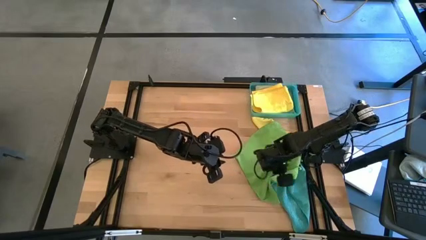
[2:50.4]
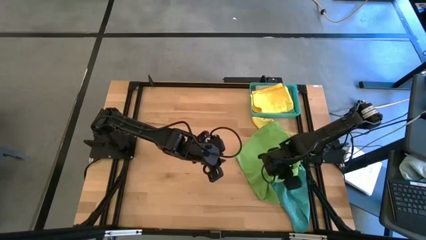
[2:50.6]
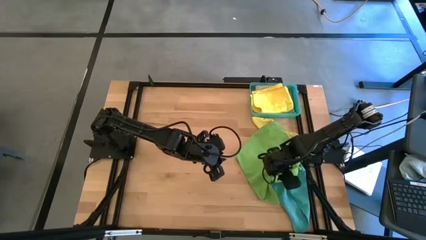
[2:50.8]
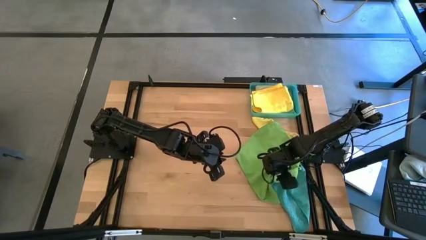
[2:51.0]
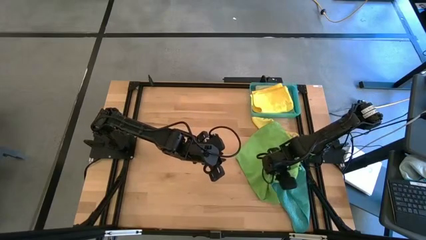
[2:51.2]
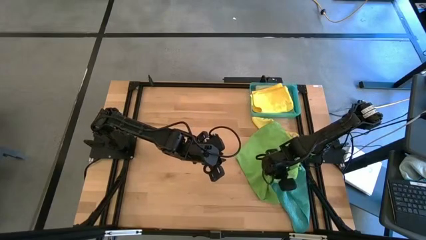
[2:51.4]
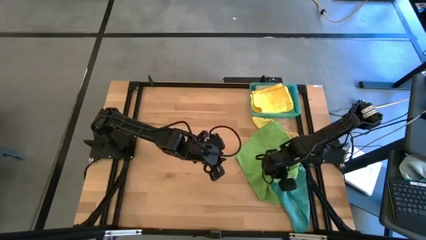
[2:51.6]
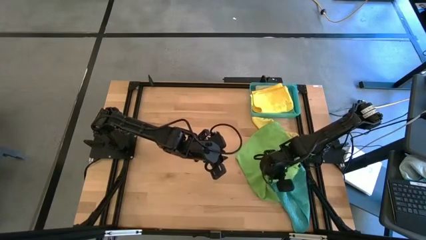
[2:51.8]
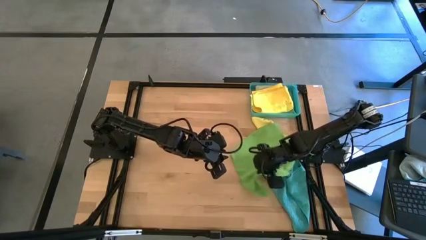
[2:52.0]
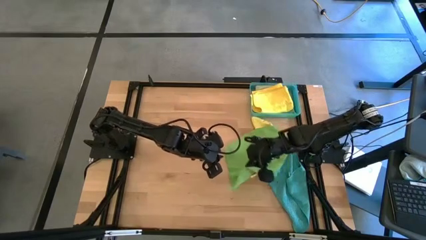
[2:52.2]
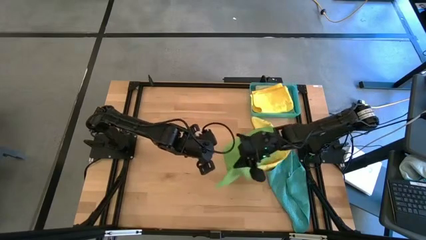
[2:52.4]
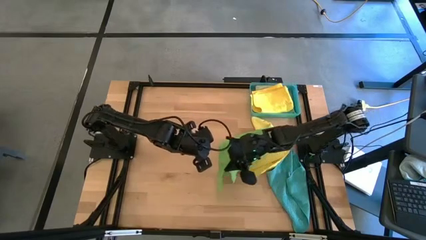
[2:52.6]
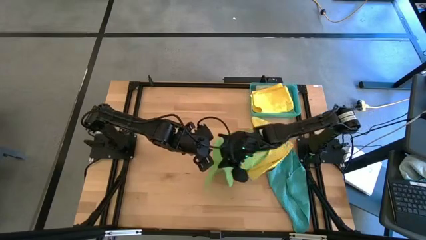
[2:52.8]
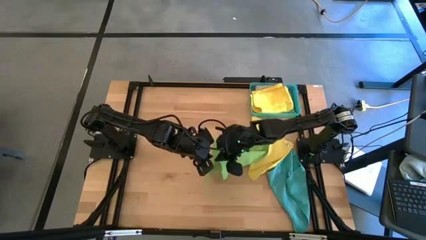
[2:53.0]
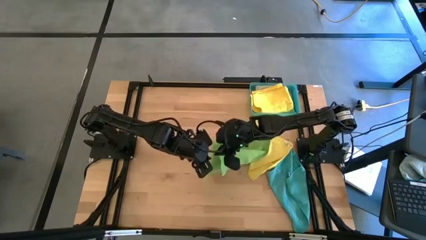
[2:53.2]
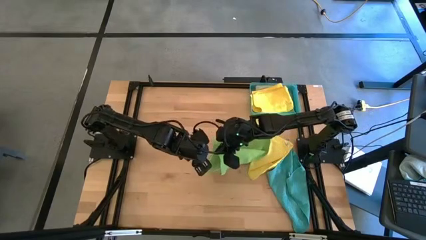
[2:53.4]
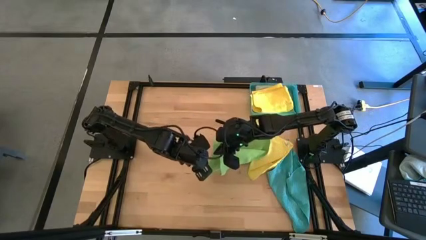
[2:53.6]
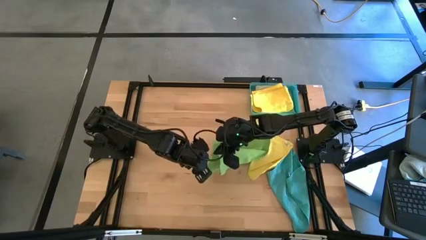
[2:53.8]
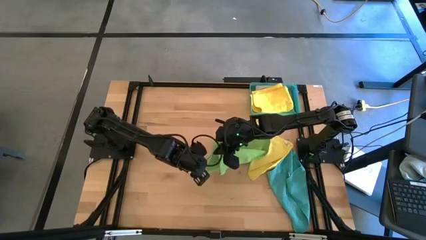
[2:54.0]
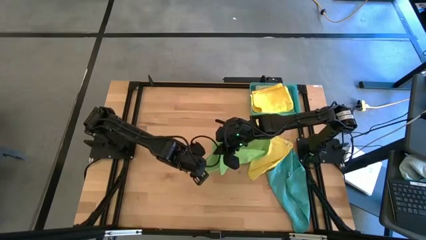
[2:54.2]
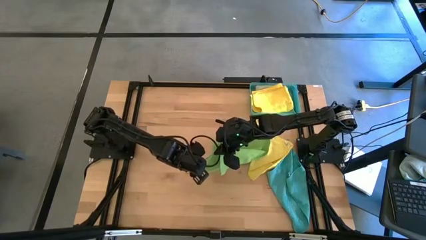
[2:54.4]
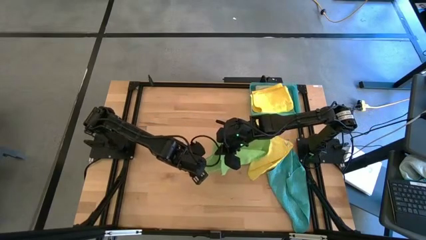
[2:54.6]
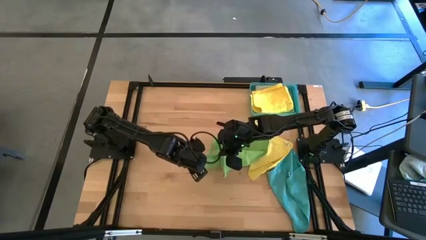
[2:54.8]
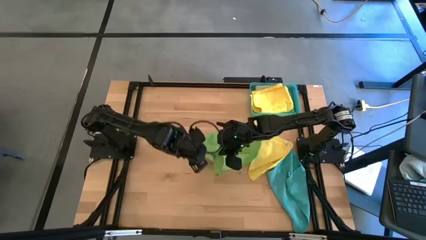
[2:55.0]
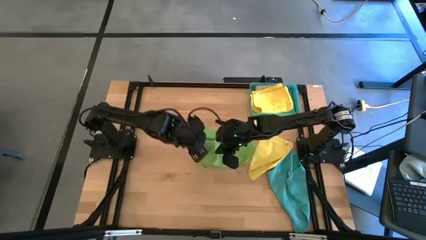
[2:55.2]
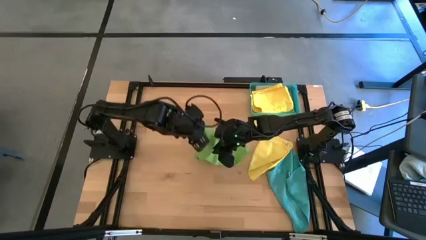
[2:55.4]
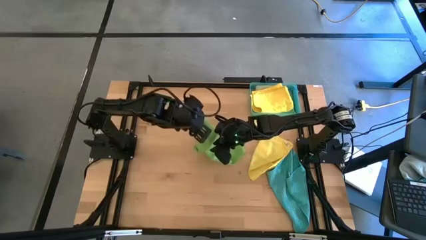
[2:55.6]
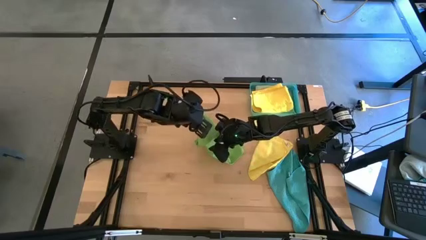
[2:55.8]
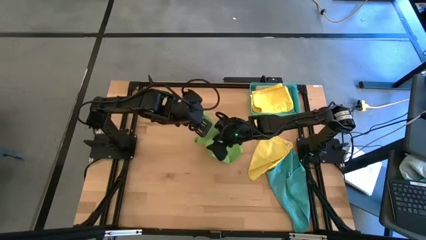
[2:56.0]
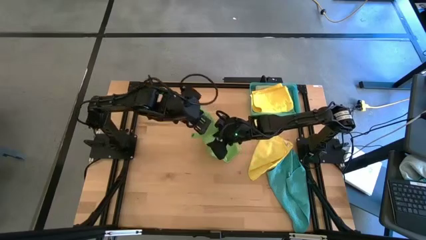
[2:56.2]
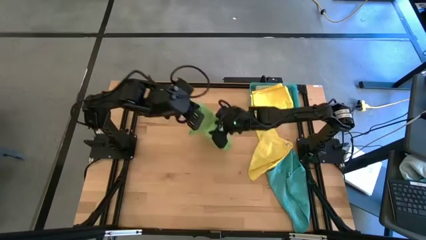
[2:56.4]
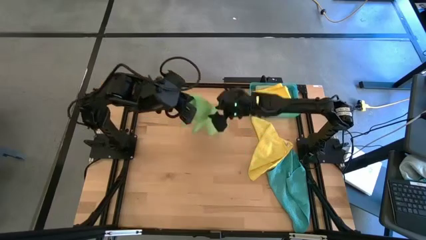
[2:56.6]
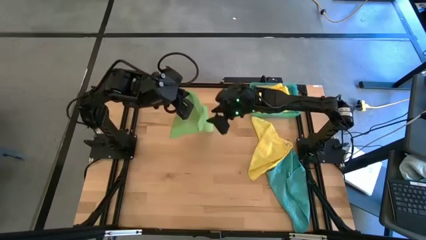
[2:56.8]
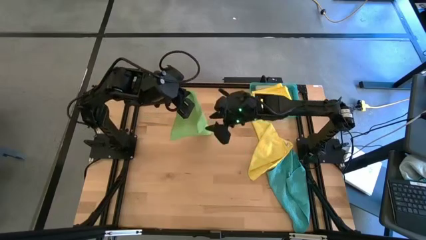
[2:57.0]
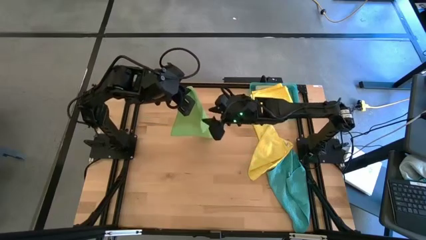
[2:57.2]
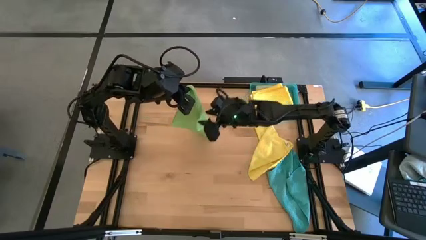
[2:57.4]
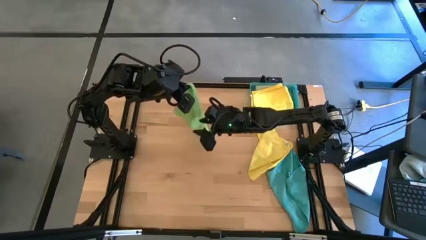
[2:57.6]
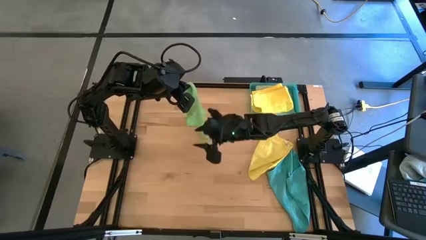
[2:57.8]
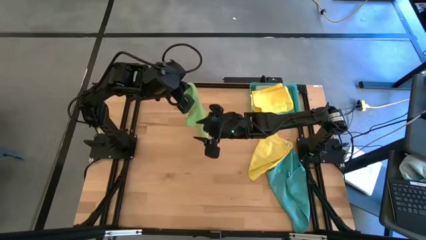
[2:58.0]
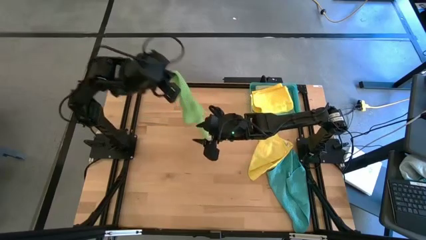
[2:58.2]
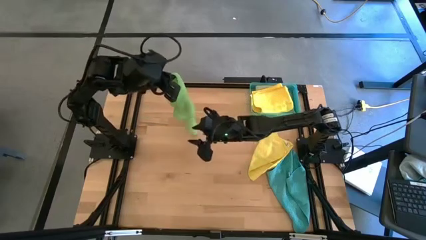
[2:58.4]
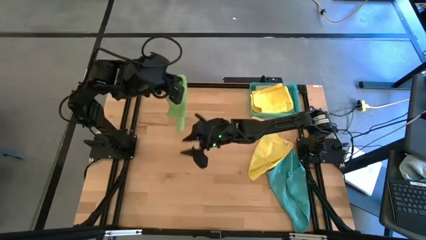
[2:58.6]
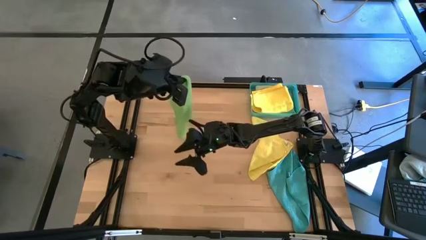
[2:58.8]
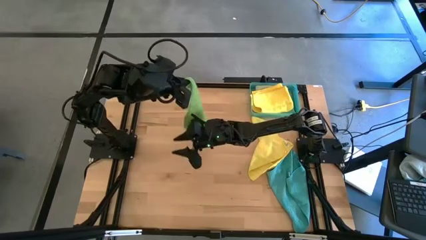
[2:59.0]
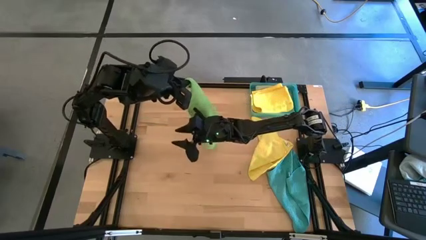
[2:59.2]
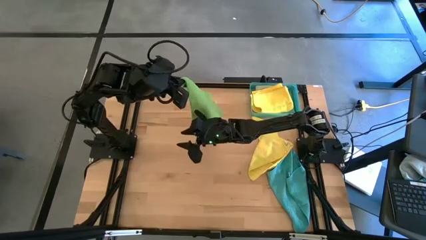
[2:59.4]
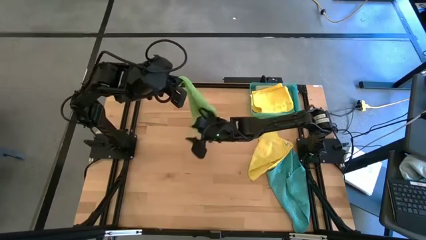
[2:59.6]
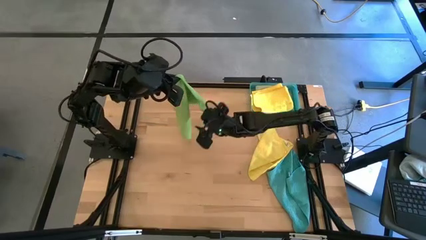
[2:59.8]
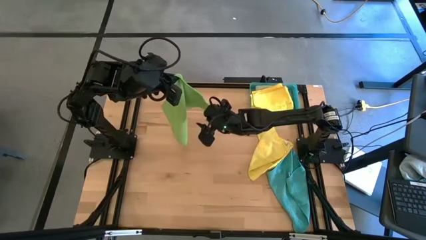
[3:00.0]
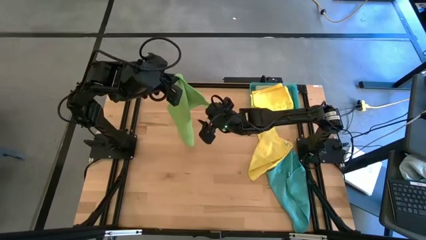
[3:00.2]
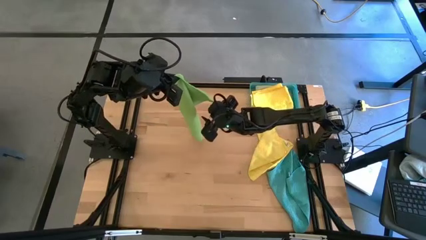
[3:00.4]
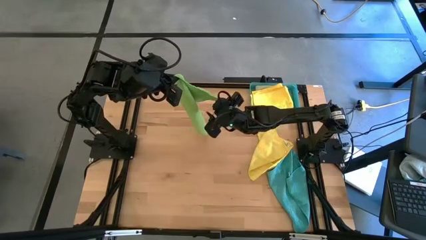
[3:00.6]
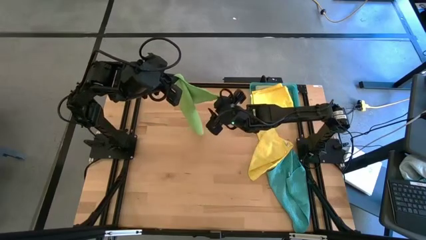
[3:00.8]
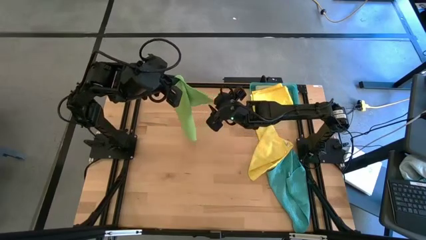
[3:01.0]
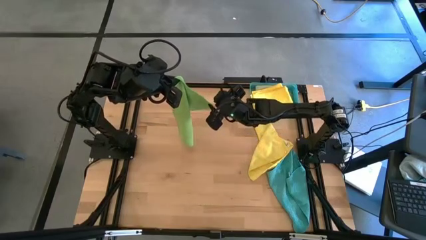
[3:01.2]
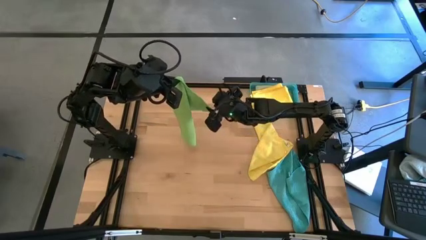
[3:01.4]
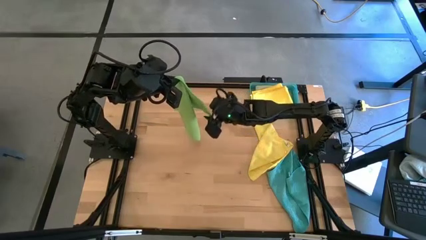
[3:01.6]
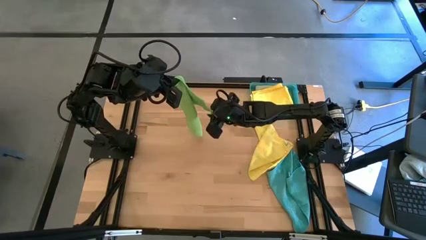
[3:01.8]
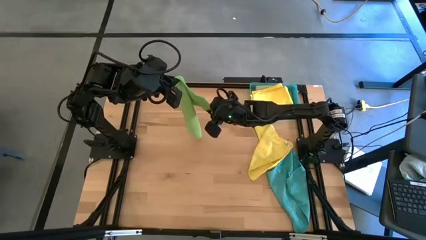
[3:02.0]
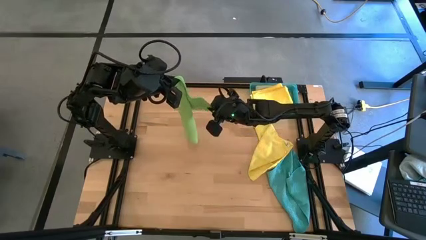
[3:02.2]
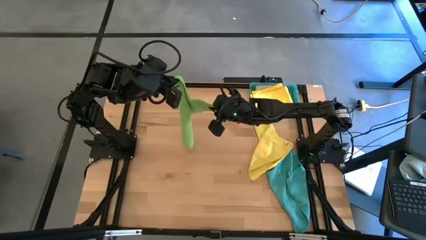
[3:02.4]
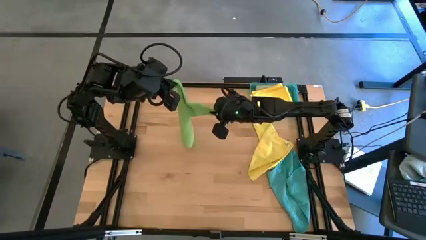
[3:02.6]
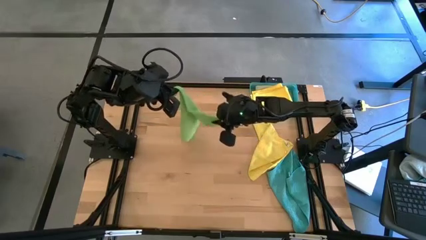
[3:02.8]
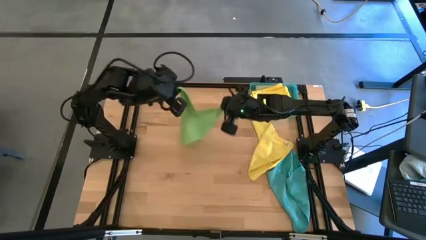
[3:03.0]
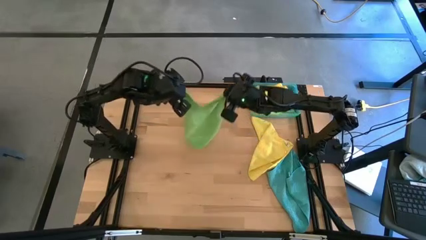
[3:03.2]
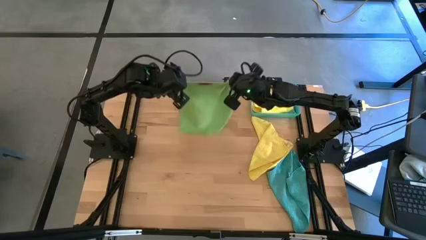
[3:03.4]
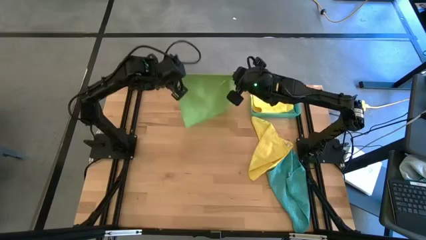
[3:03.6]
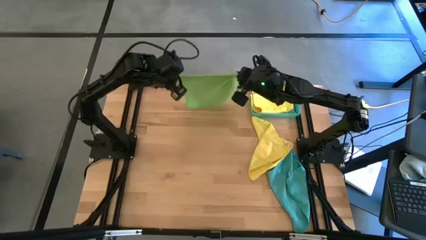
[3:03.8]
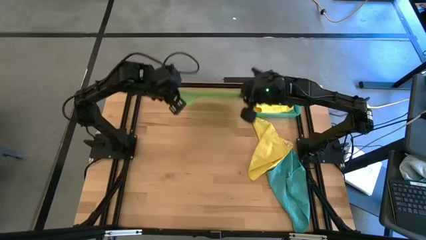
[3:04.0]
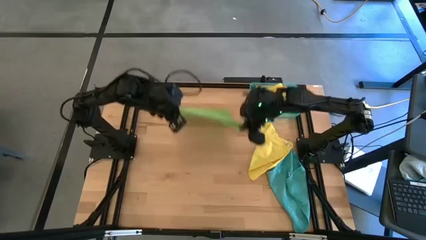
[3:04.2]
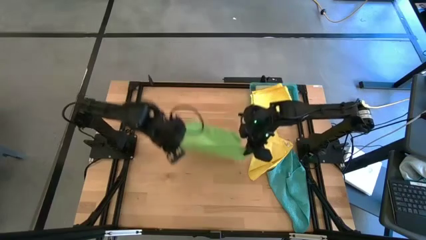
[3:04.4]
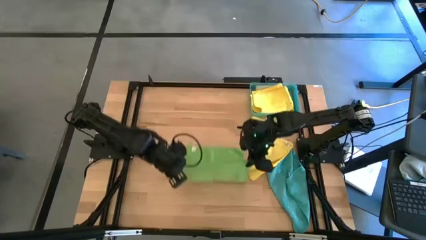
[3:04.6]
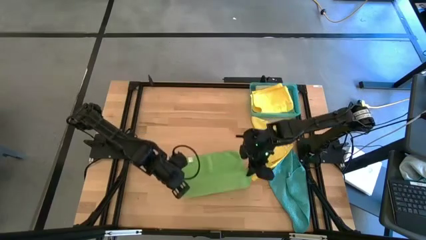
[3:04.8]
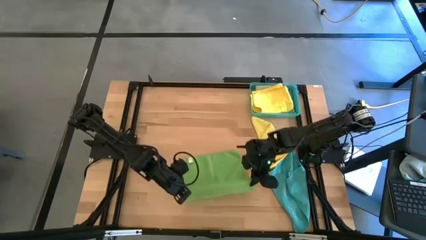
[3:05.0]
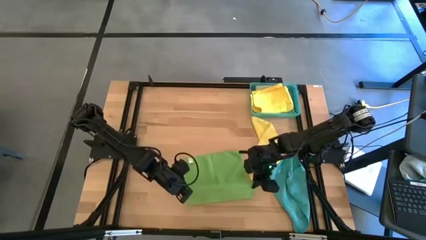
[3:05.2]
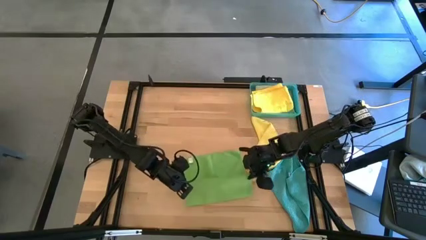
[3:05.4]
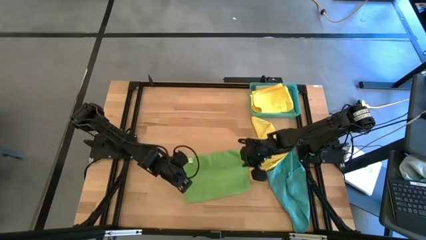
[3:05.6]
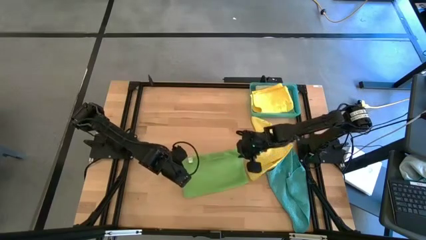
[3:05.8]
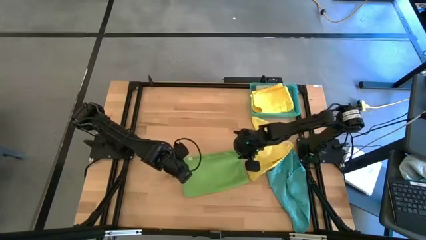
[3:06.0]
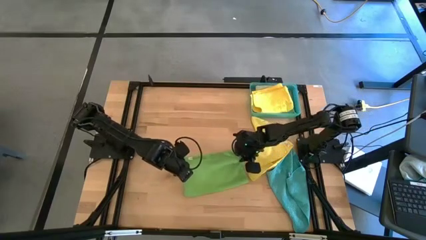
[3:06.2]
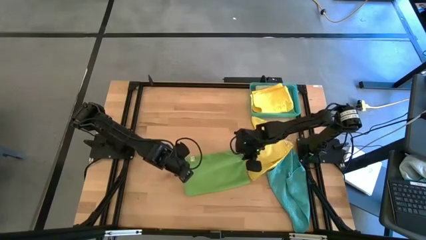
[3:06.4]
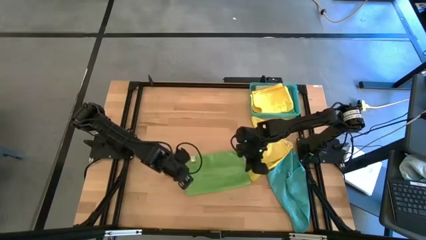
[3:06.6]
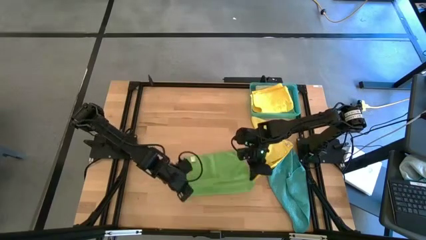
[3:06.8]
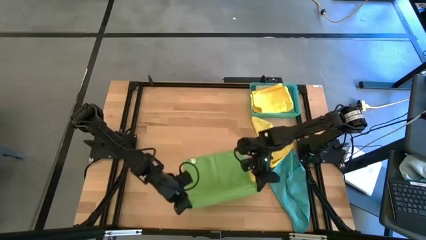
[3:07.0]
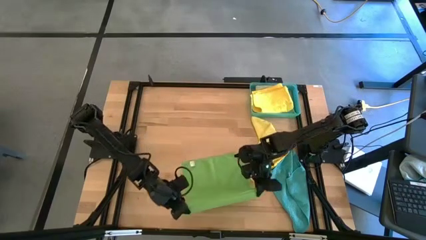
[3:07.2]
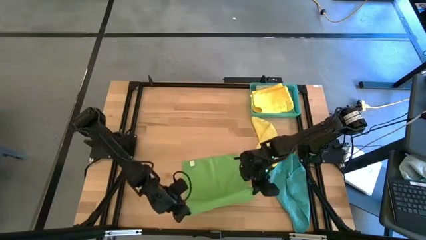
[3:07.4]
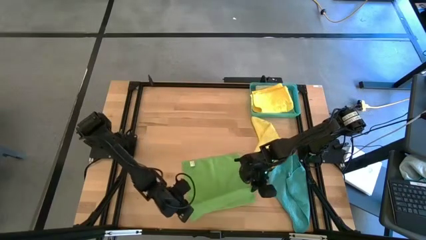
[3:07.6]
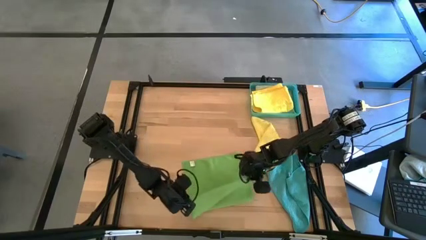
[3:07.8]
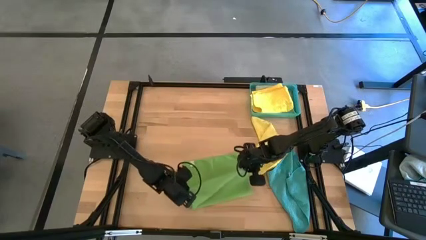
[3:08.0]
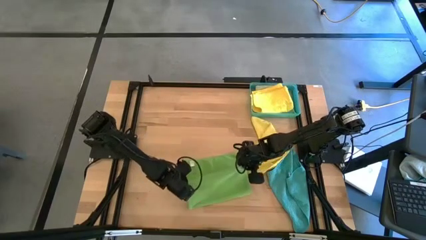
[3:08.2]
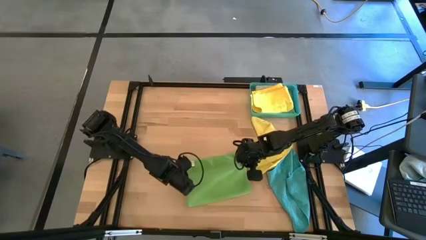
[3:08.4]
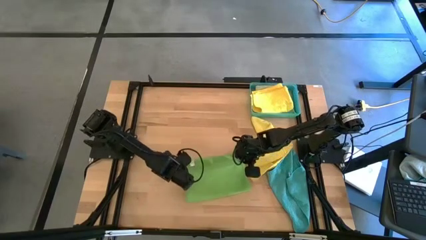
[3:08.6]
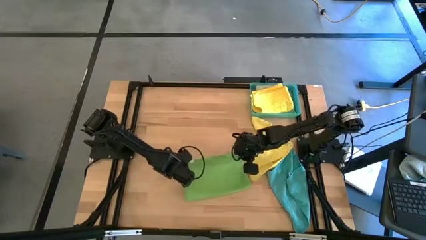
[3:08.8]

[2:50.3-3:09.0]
Task: Fold microfiber towels
Fold the green microfiber cloth
